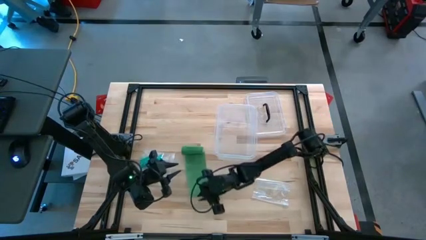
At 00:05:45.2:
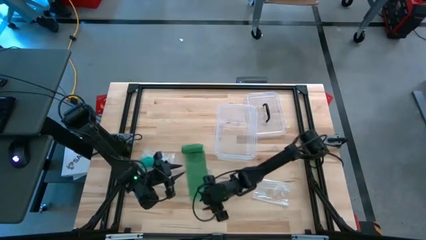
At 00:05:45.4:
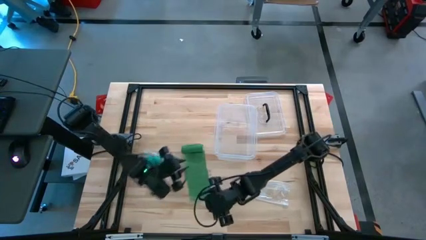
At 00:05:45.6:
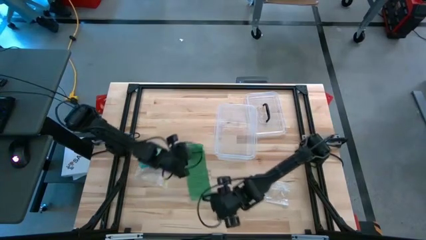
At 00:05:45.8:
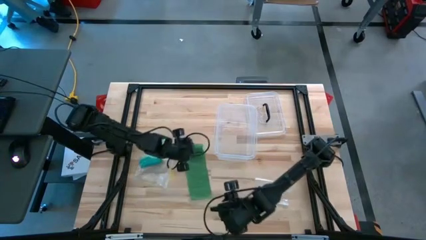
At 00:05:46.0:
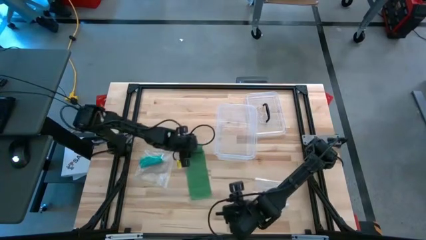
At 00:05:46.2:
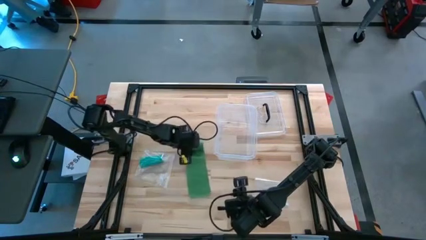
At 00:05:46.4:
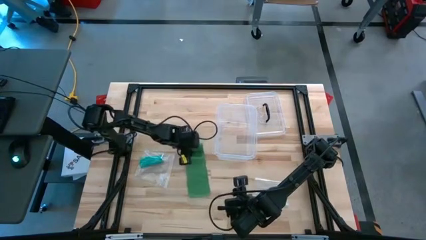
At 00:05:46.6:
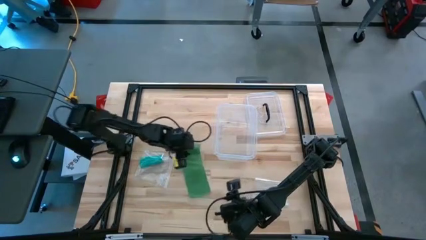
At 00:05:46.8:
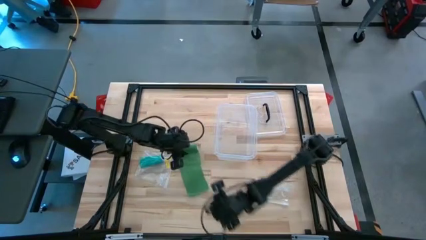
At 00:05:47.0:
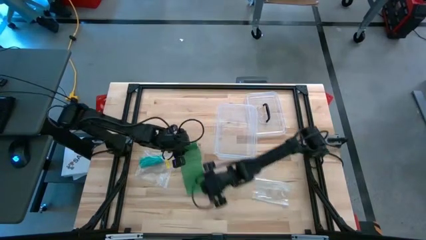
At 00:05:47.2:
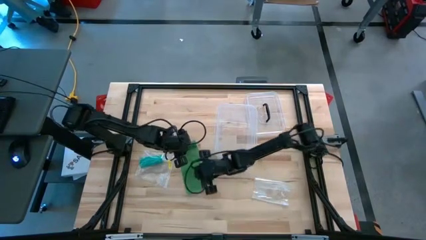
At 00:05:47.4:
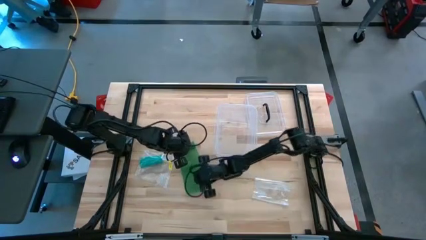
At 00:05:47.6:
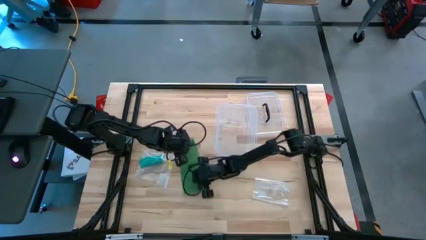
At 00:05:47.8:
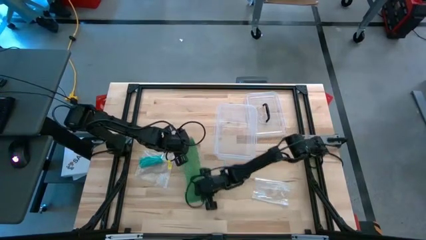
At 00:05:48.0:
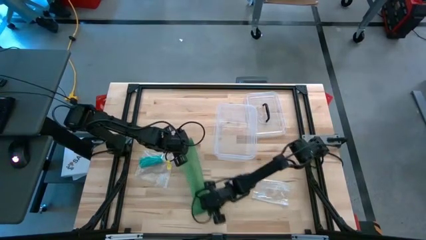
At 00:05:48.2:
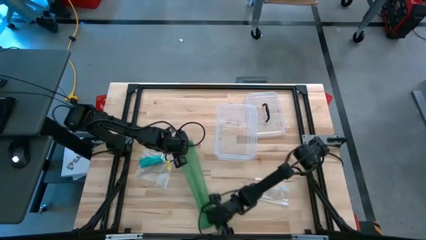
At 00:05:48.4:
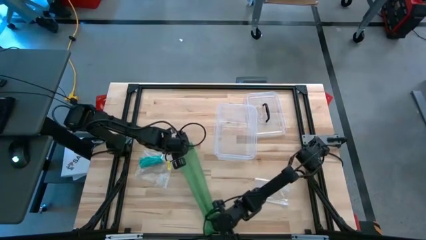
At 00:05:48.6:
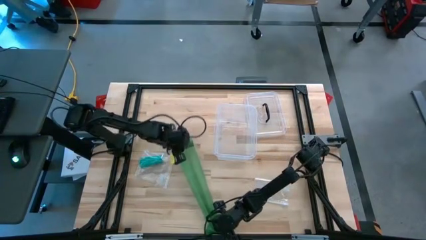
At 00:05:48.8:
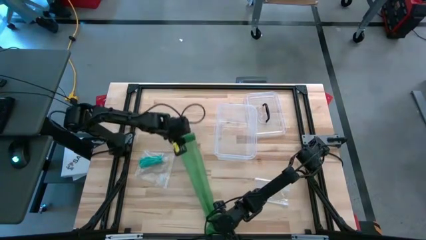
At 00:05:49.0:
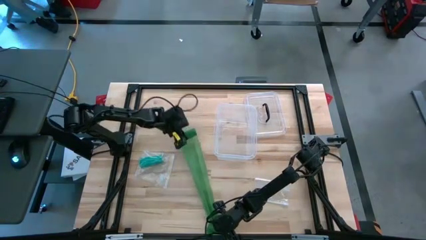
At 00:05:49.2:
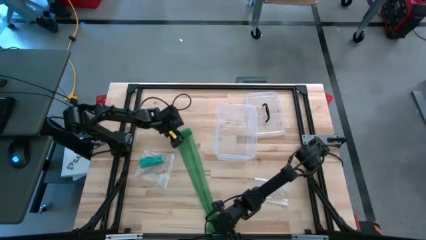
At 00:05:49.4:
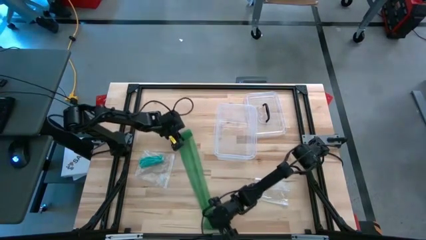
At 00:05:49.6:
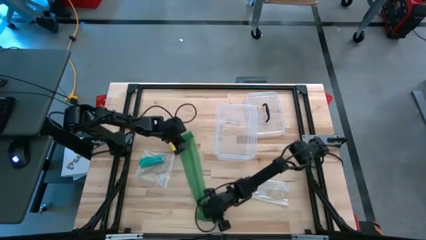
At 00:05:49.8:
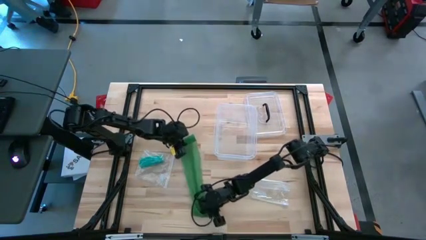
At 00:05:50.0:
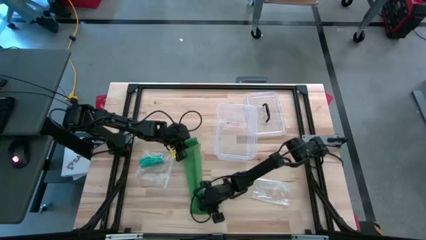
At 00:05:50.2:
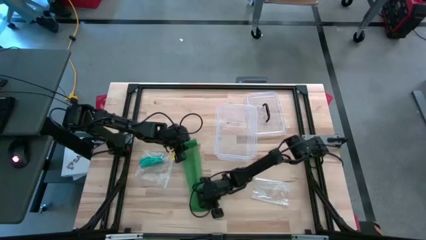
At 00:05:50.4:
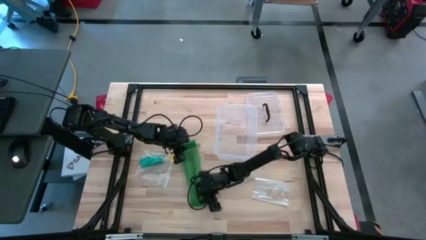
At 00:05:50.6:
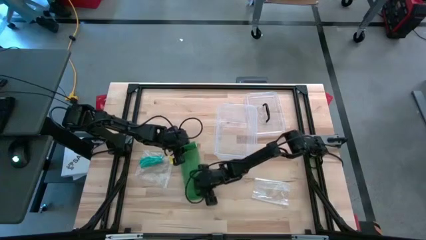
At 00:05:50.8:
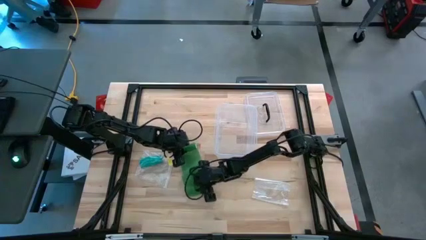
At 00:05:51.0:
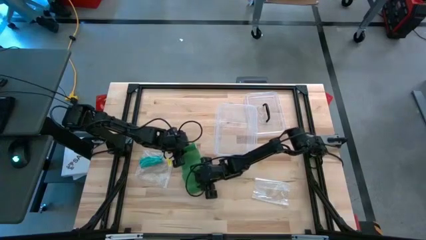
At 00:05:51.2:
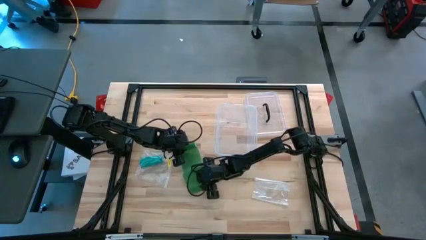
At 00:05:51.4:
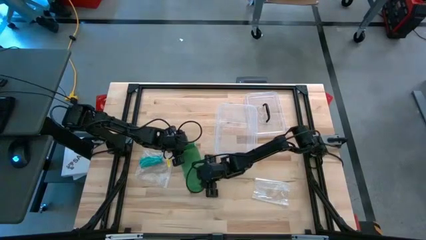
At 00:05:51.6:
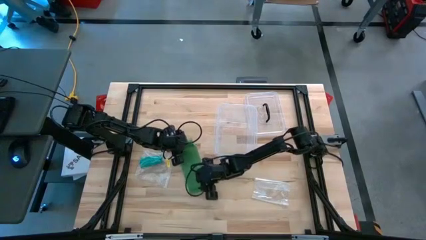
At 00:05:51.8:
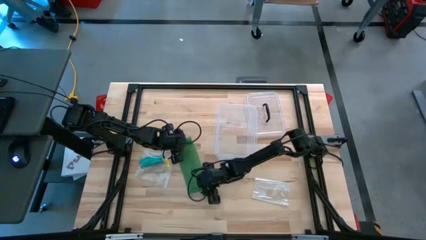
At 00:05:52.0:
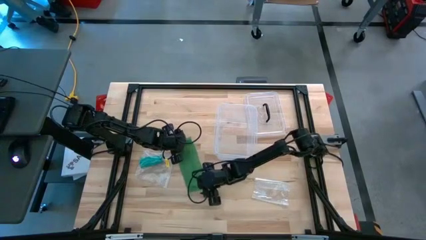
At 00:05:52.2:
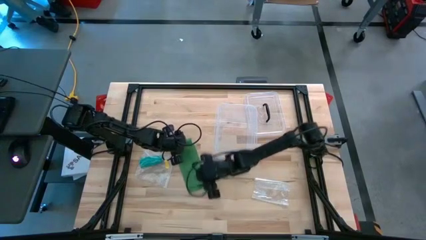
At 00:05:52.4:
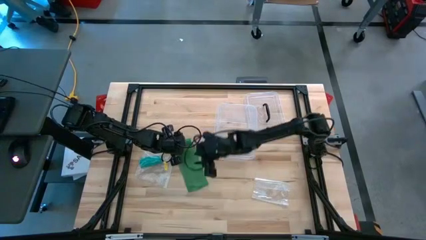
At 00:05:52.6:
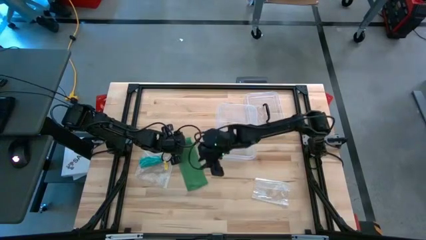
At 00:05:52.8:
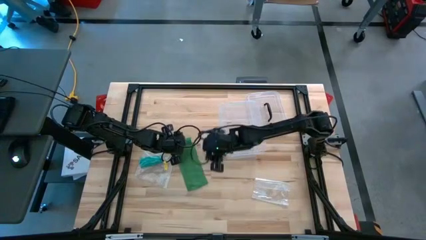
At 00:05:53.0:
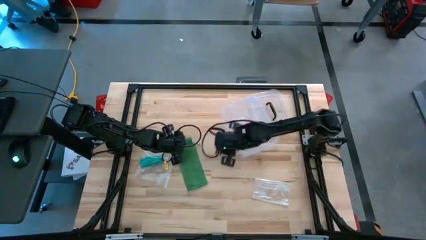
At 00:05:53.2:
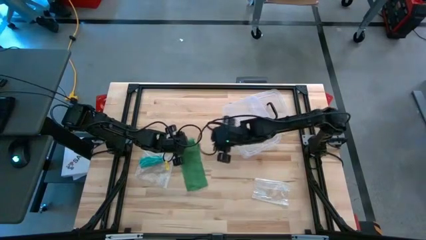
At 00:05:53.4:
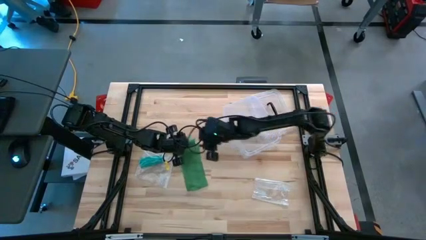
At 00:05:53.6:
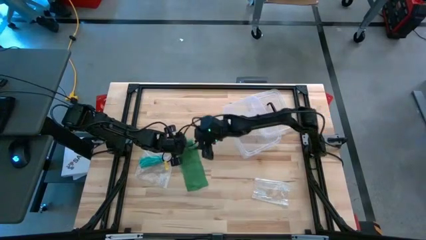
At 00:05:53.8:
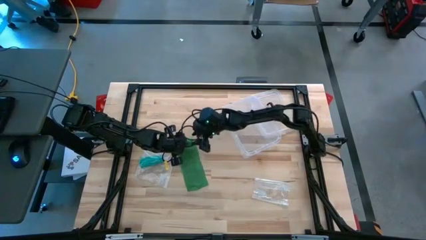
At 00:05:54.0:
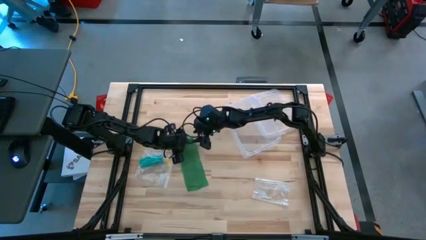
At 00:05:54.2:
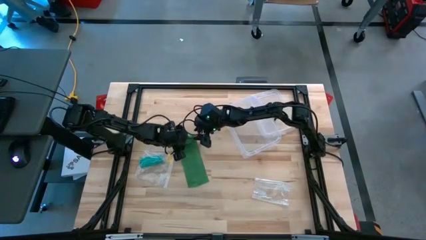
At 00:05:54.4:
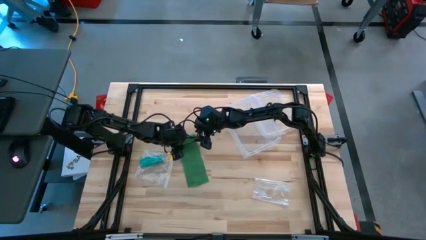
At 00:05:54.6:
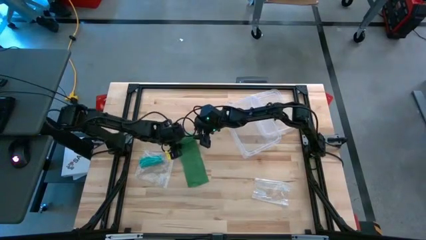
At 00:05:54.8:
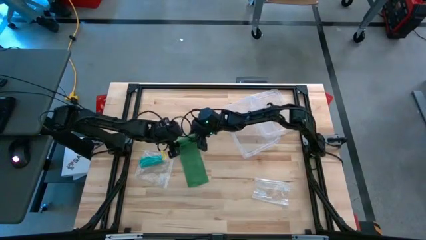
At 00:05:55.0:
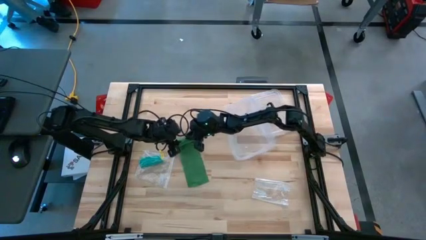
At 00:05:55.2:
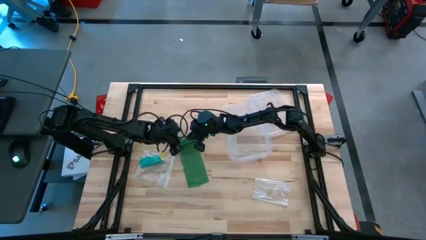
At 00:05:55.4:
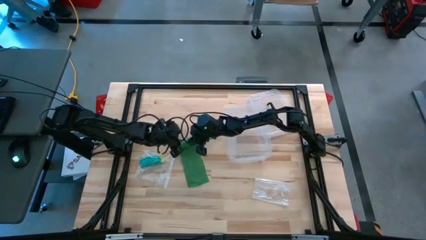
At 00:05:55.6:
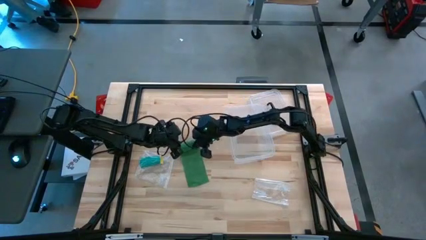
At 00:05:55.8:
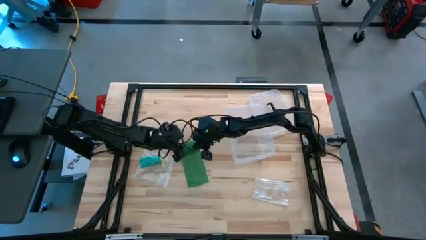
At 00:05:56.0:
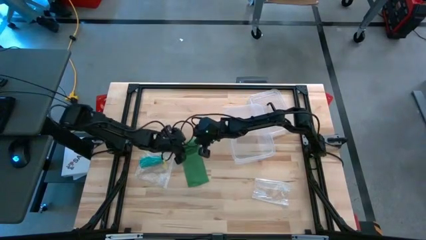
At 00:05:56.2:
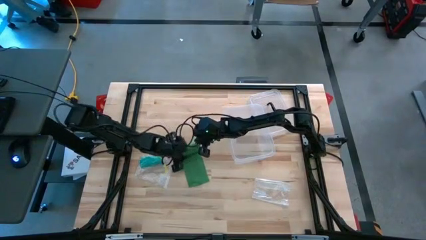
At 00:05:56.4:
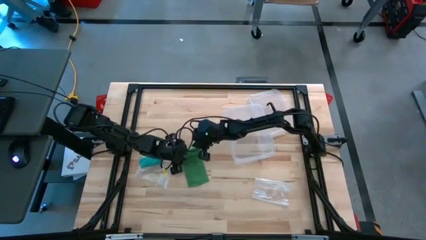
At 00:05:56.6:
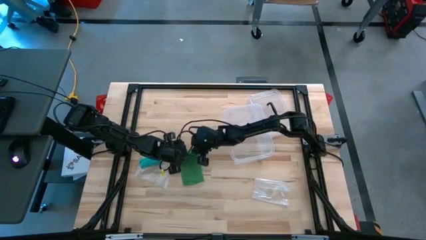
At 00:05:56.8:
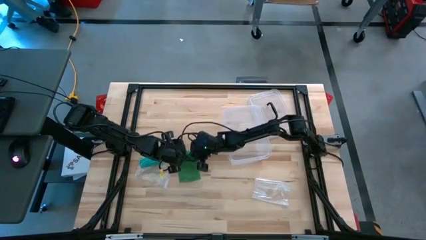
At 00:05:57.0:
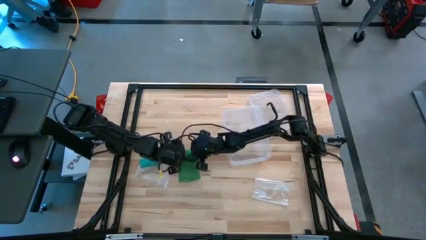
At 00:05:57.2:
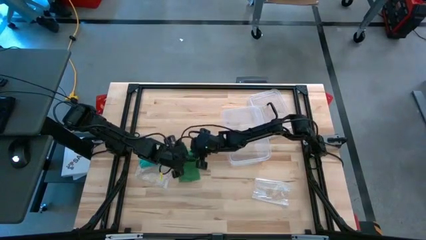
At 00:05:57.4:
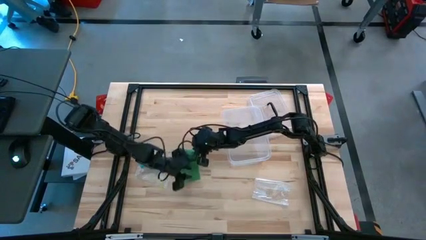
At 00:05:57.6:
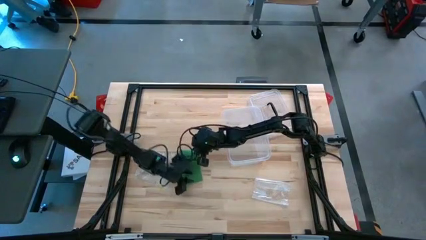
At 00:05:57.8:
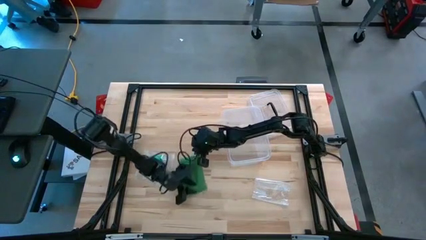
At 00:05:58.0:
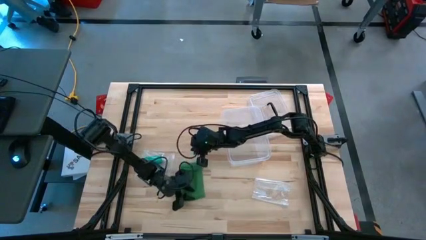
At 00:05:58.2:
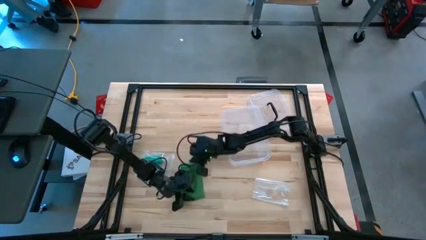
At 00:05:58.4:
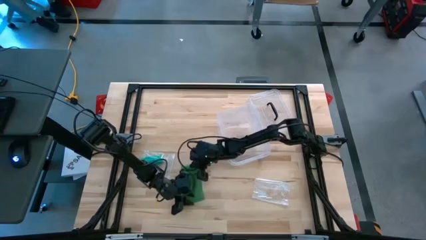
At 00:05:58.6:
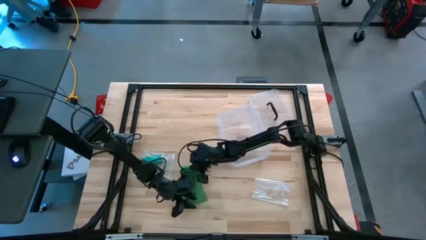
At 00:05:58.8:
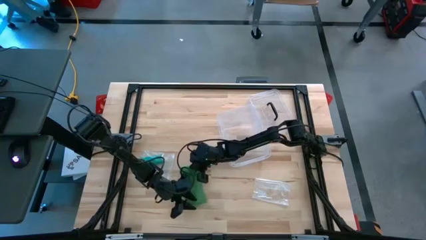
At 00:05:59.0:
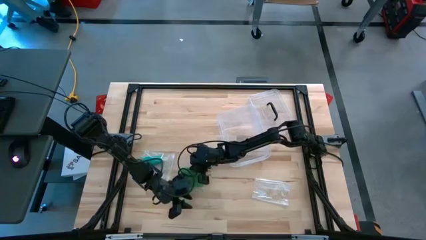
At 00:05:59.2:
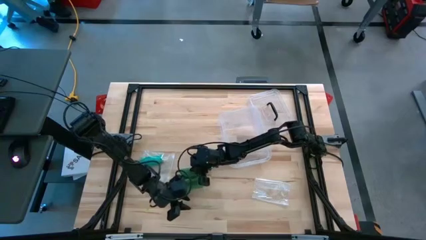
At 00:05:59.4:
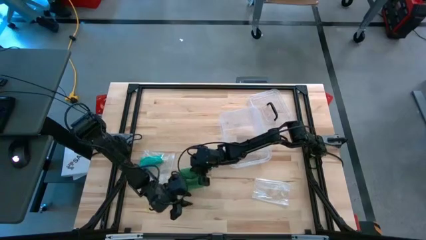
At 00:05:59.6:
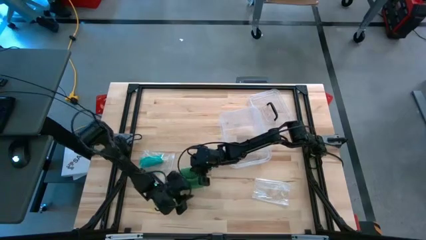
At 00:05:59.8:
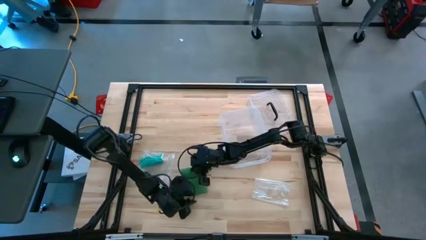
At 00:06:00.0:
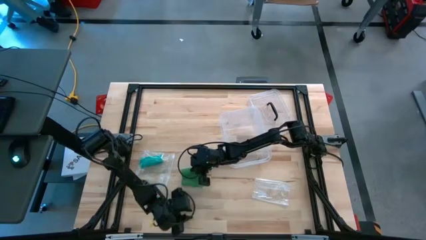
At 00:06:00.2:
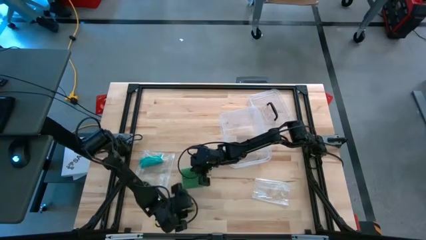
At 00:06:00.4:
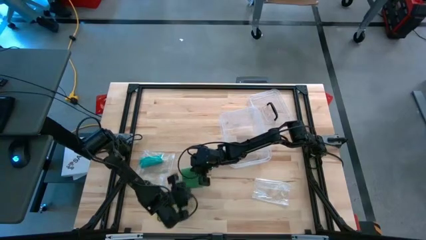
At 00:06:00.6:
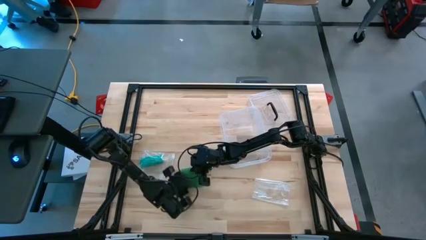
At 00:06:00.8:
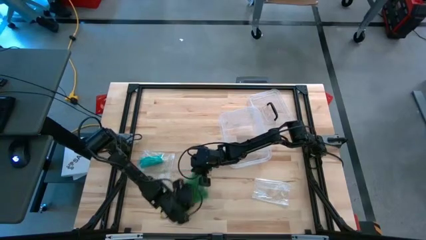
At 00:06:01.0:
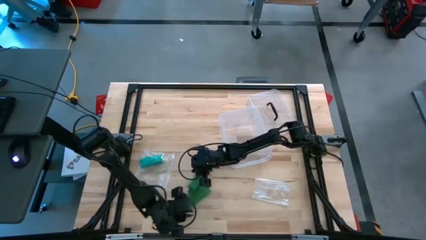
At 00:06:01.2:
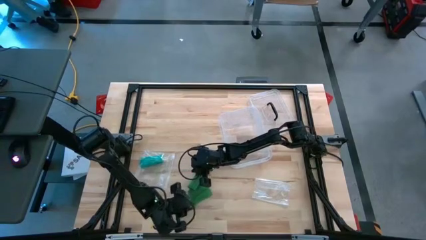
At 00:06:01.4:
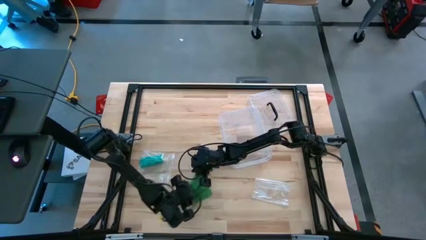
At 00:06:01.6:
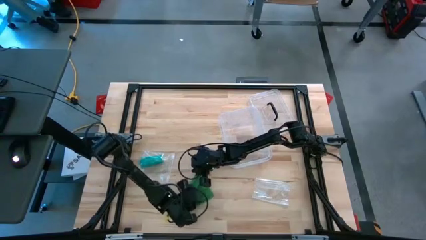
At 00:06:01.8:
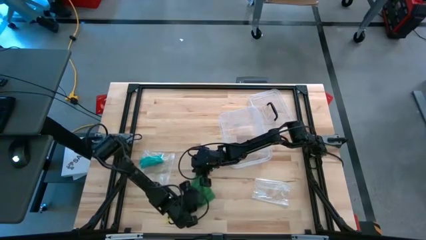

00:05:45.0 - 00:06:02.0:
Task: Roll bandage
Roll the green bandage
